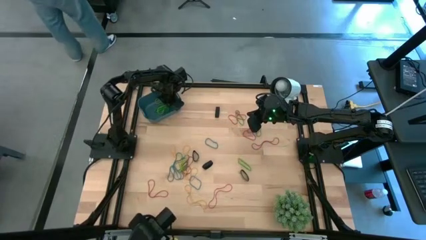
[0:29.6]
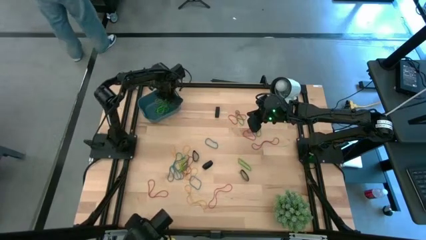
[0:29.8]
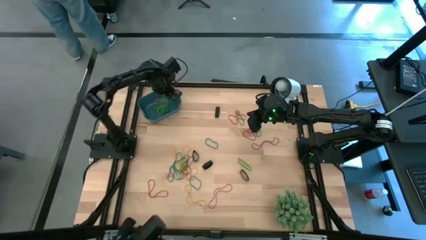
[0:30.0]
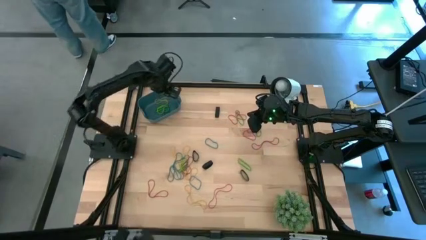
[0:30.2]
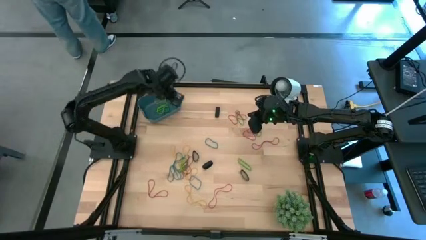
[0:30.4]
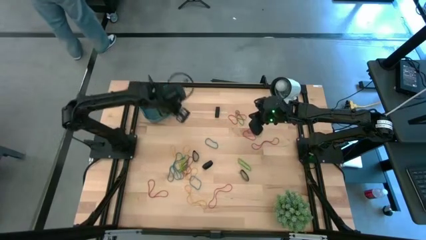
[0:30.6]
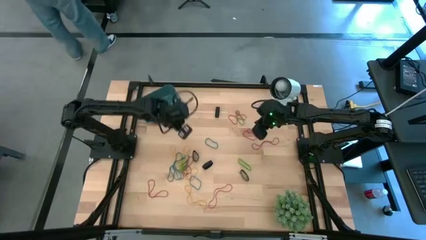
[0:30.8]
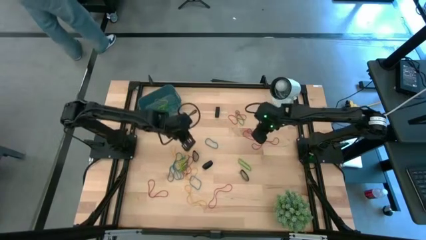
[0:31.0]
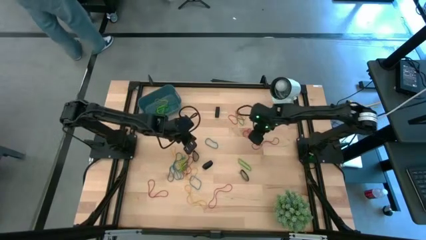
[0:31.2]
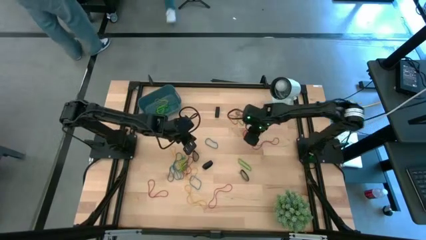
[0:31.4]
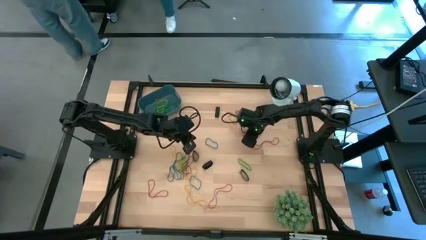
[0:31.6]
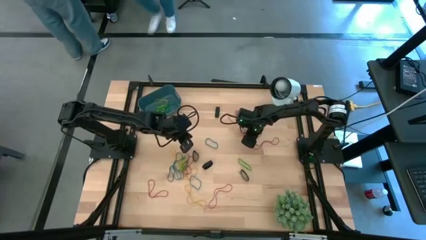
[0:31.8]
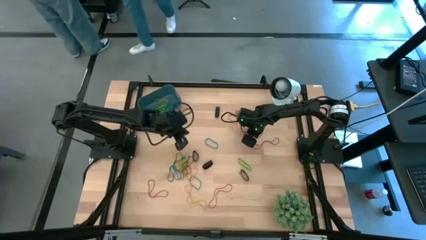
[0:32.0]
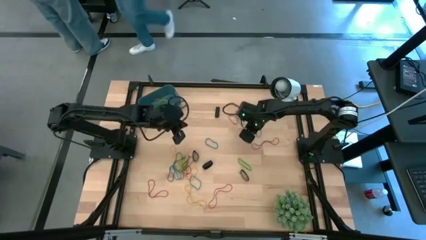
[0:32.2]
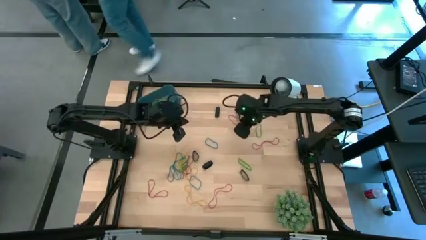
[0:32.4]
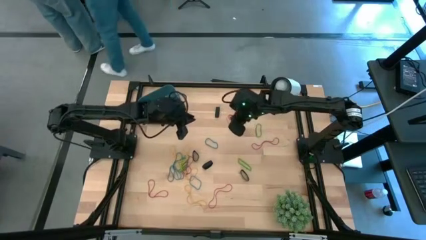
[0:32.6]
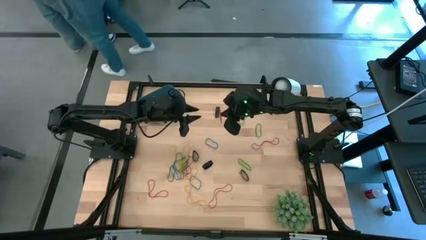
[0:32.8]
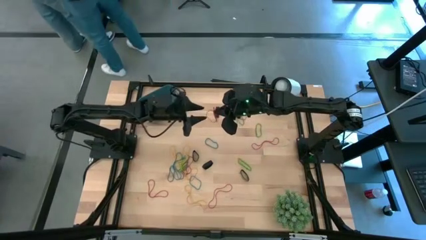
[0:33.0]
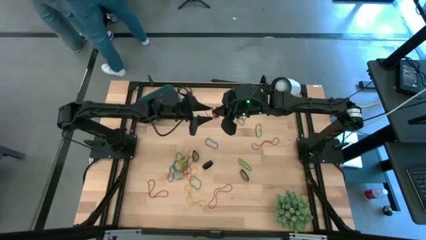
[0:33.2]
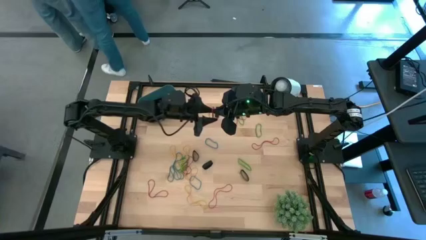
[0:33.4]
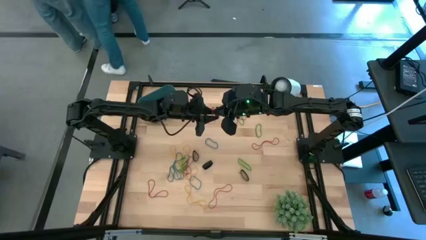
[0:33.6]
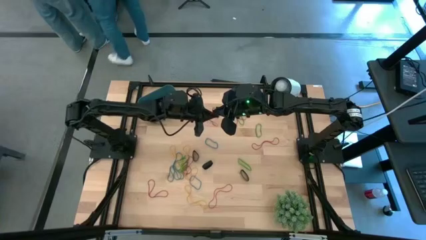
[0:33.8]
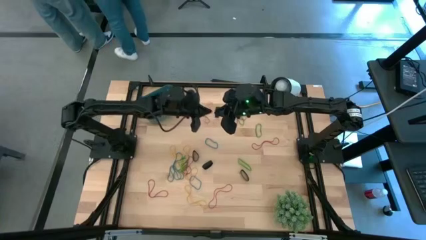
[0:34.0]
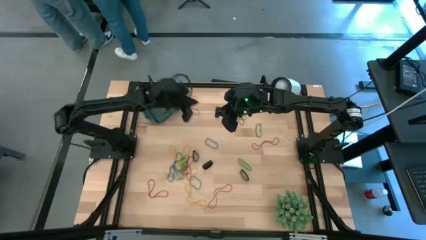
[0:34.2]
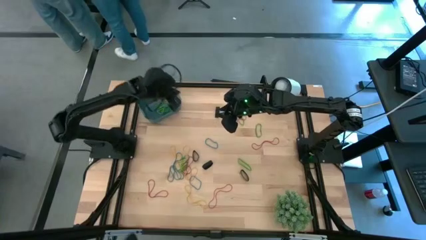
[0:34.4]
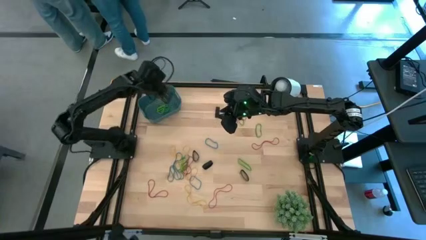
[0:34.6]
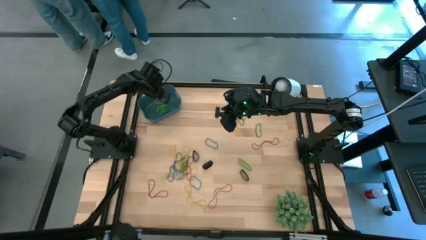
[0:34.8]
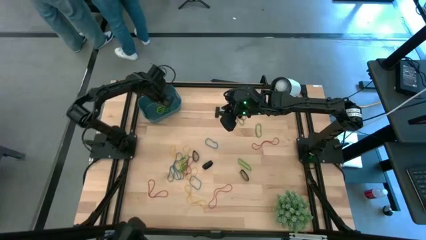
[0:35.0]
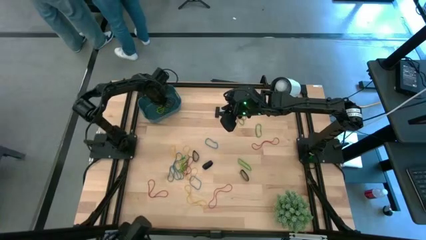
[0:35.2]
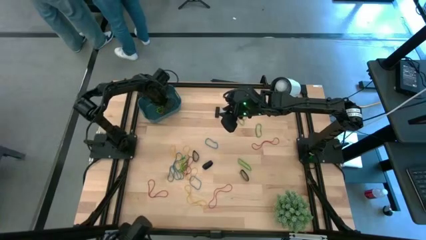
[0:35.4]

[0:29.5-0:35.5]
Task: Pick and place rubber bands into bin
Put the red rubber band into the bin

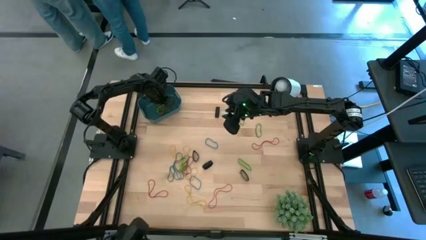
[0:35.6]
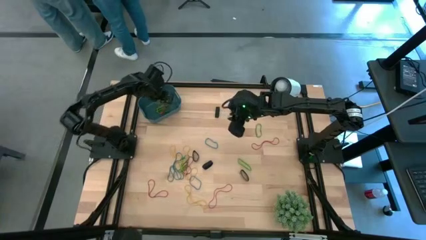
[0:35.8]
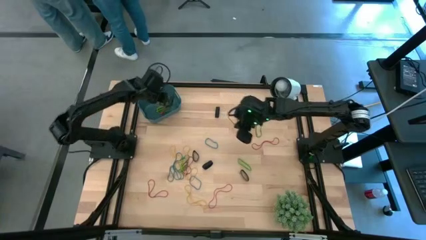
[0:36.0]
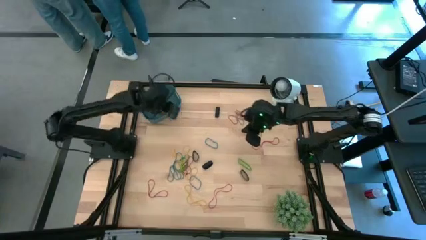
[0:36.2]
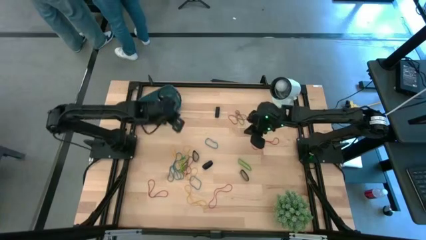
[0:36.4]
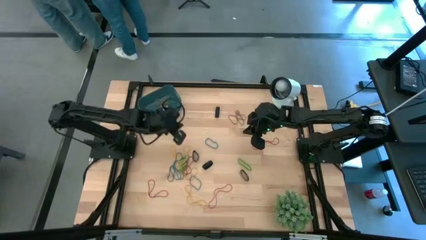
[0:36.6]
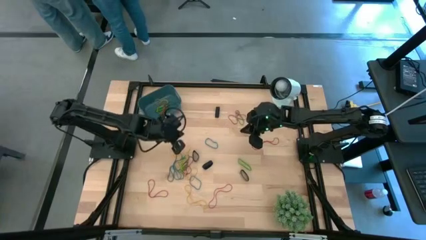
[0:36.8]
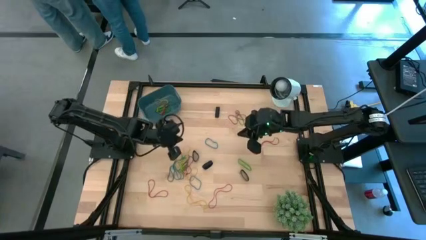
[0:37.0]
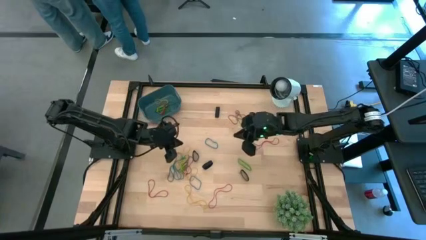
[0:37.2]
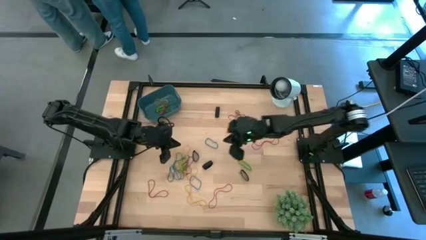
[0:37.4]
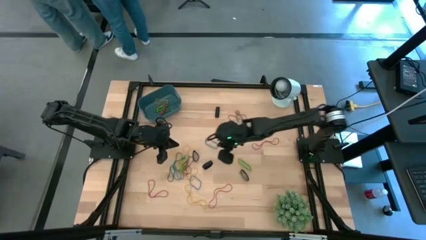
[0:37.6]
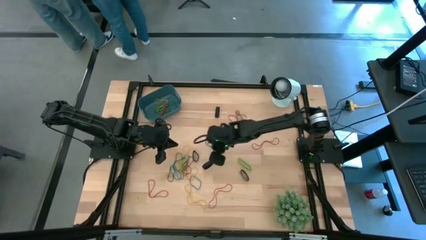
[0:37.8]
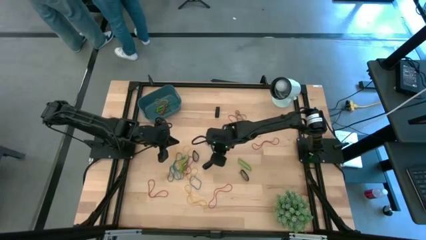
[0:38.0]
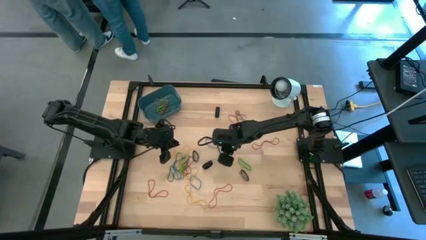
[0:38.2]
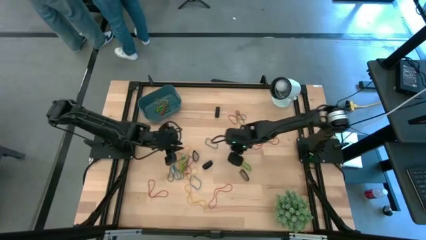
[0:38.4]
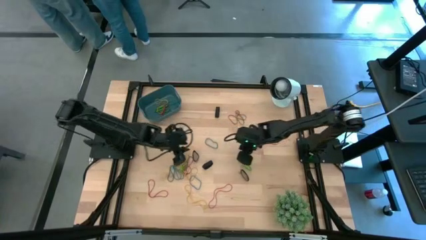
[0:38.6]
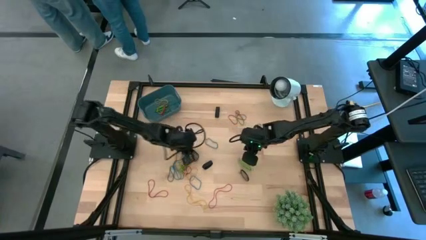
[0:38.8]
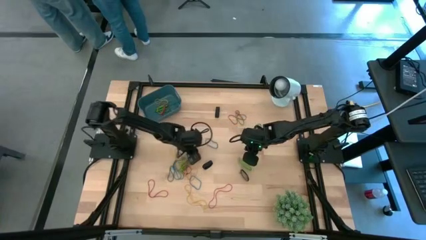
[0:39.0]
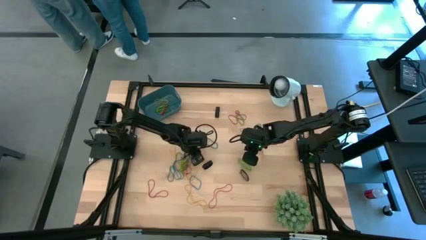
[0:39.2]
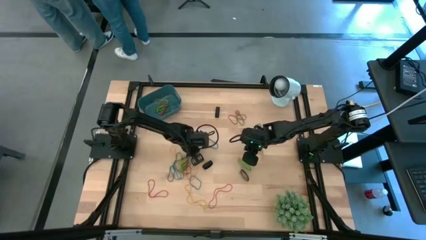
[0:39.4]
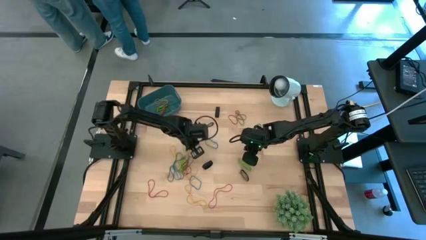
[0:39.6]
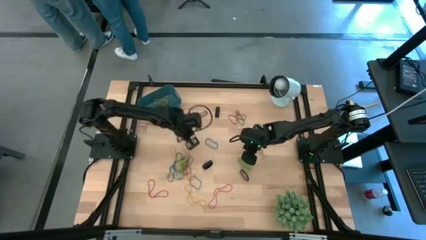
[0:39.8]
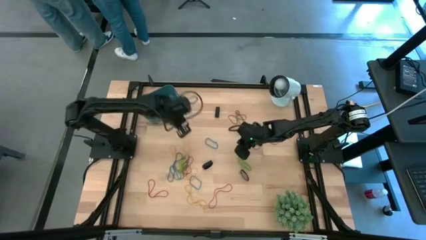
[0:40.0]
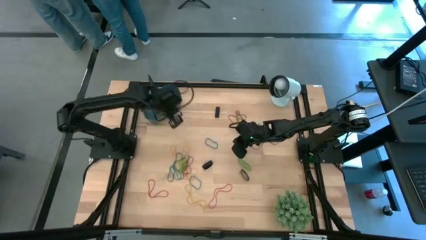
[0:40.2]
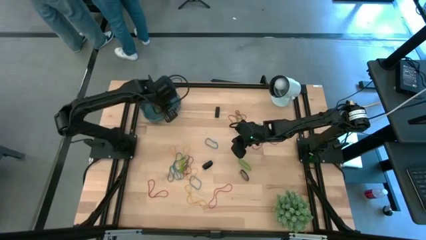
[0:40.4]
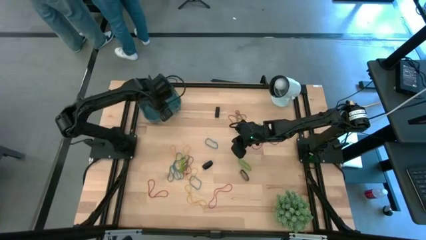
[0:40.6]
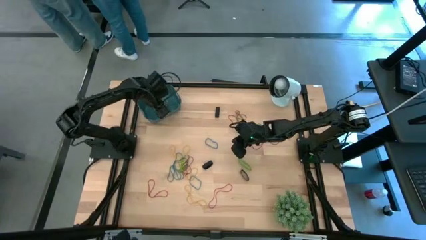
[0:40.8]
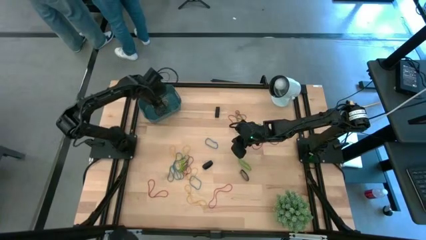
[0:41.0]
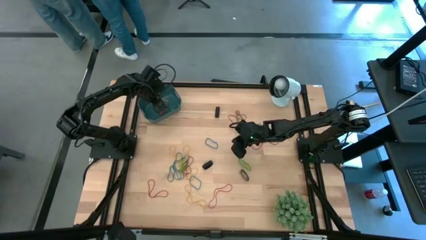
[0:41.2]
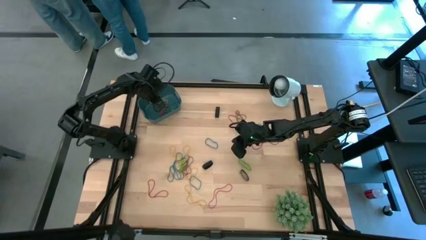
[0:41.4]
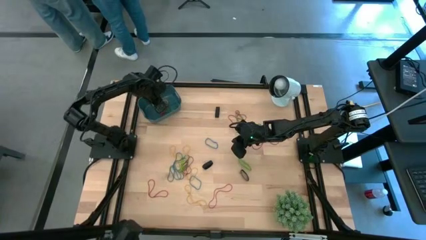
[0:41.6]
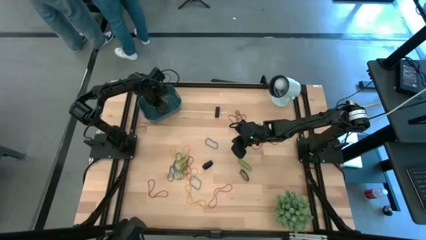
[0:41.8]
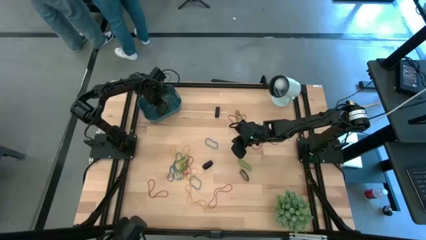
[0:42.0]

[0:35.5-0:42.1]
Put the black rubber band into the bin

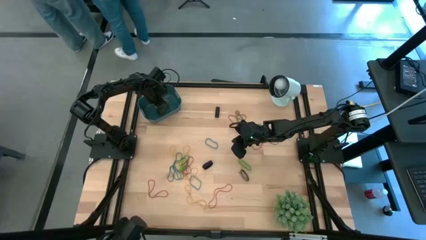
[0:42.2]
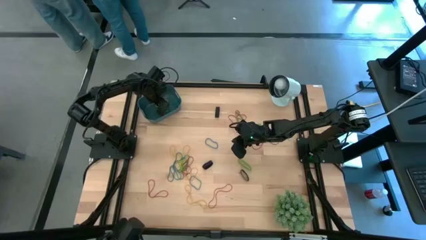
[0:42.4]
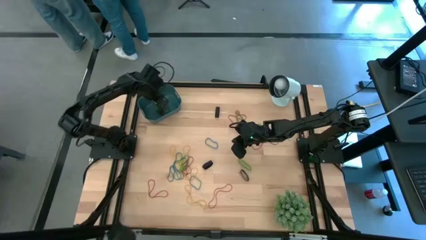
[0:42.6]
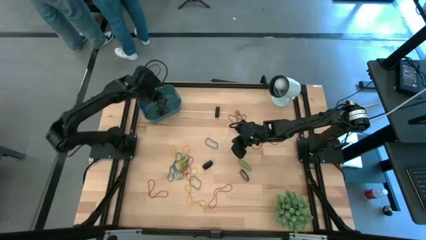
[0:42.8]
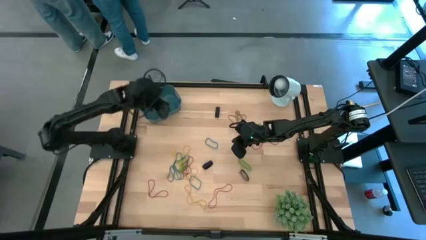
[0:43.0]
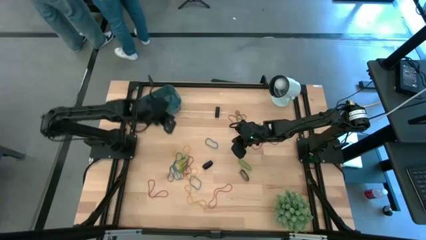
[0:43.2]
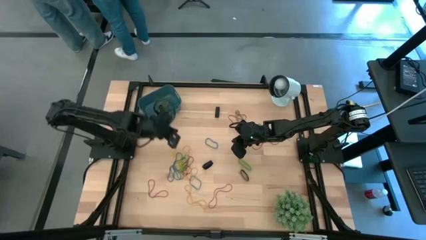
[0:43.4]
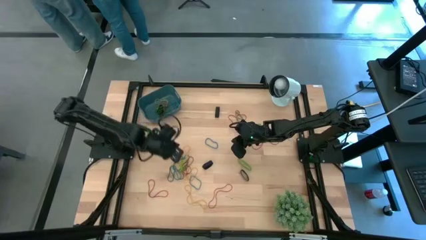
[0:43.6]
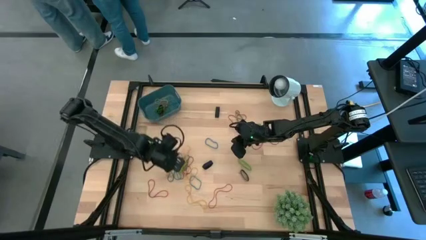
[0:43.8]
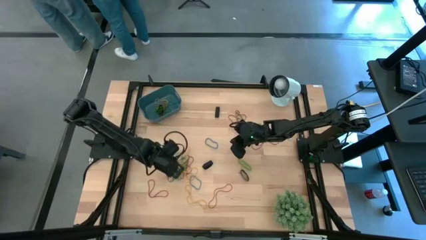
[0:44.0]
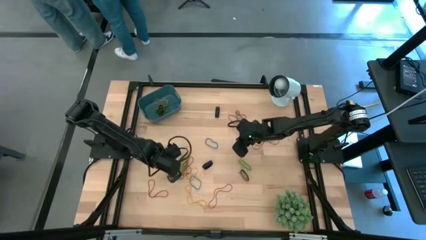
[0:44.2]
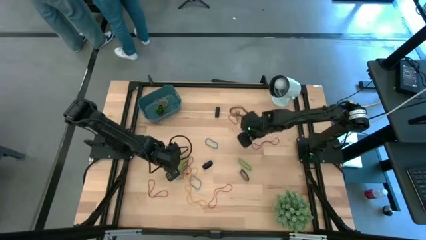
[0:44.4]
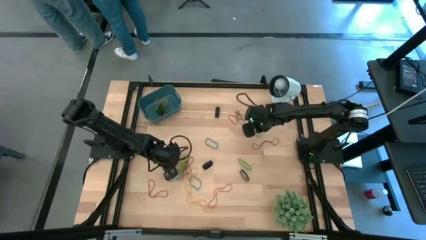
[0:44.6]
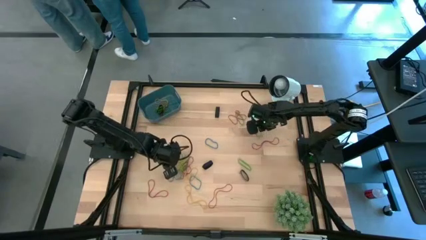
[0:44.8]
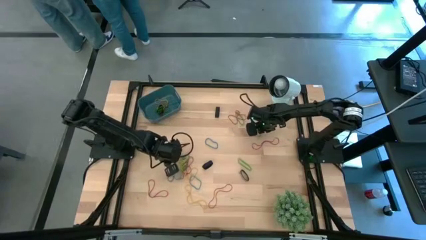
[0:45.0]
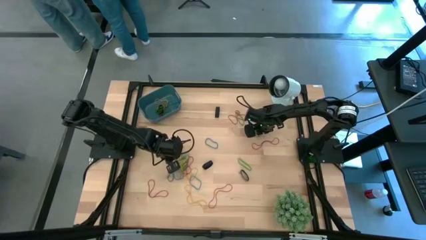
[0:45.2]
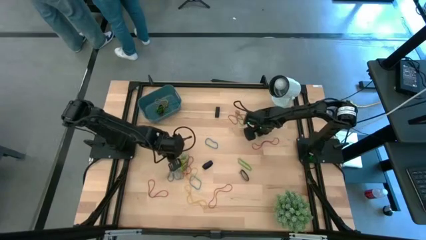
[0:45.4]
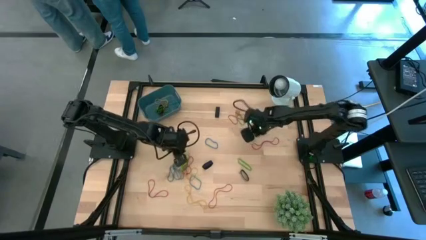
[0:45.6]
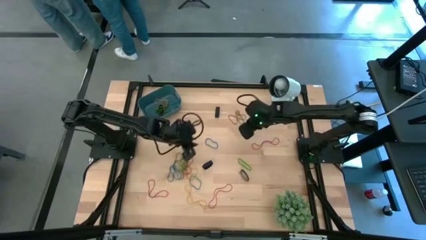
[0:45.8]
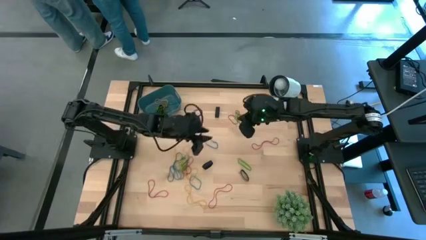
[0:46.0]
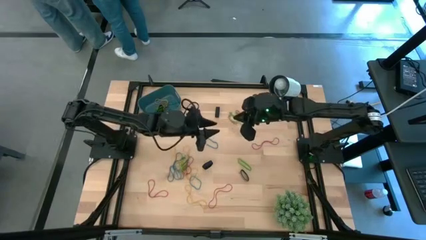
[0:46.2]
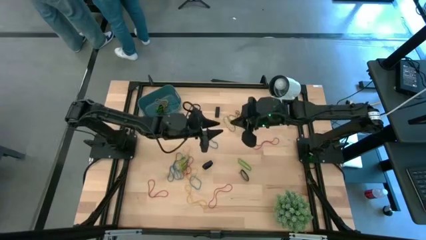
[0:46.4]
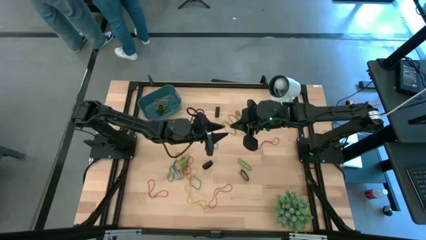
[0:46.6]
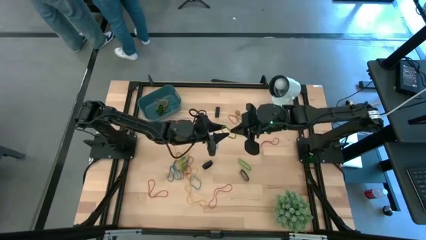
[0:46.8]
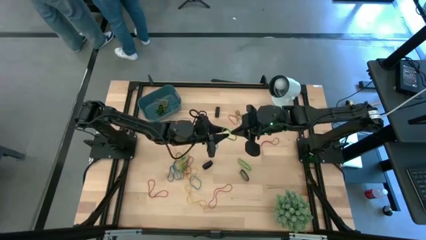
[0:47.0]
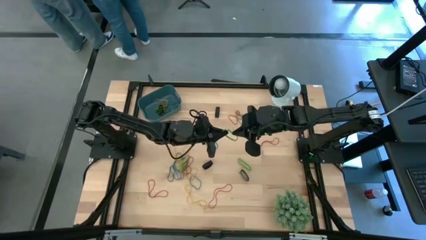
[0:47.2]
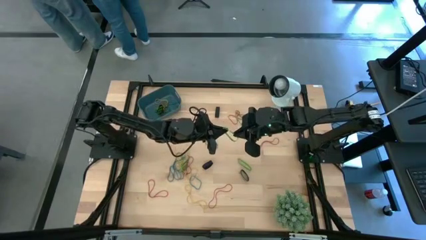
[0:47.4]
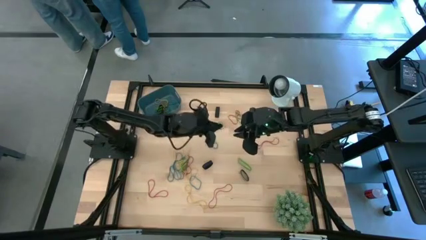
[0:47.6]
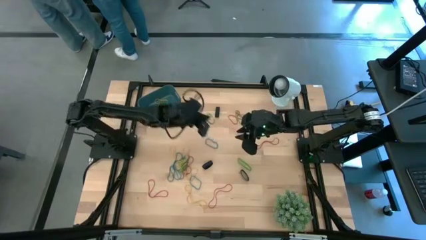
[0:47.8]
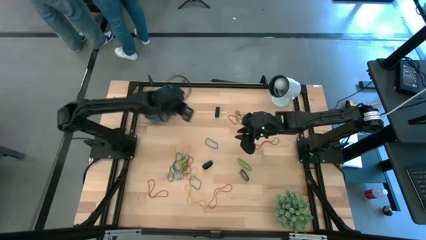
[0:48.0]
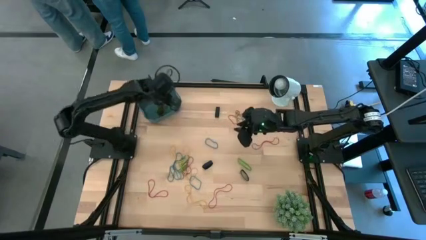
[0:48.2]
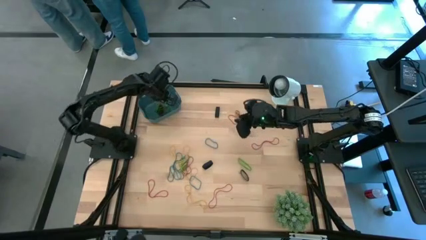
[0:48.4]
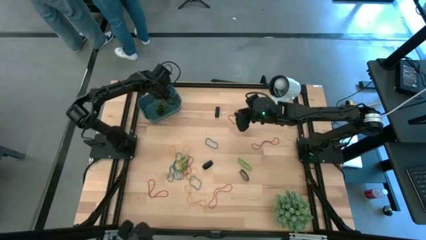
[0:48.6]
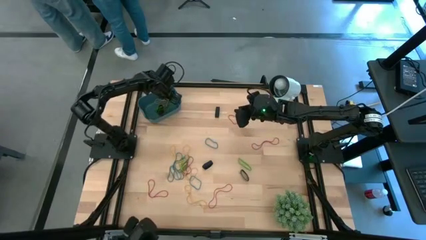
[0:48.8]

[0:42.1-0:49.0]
Put the green rubber band into the bin
